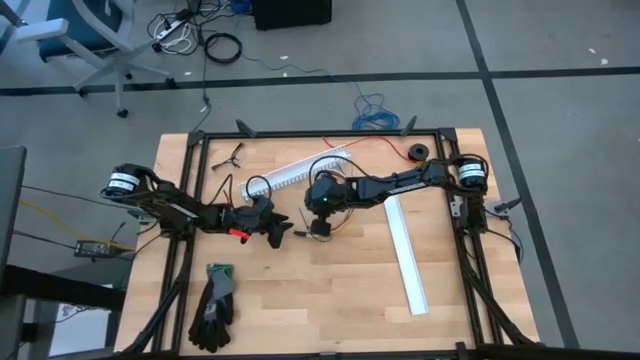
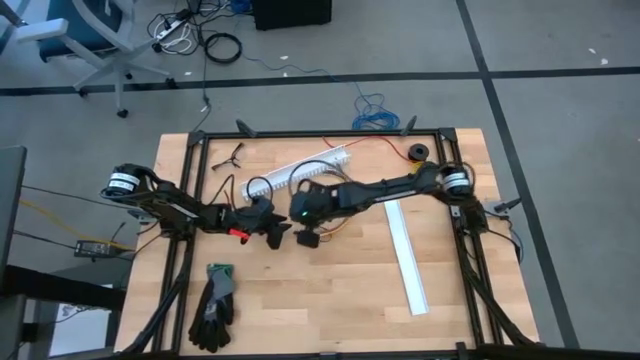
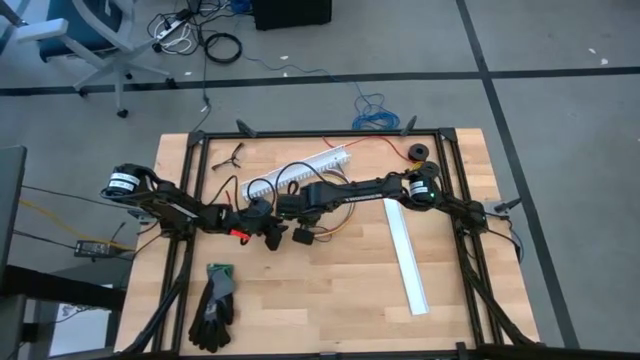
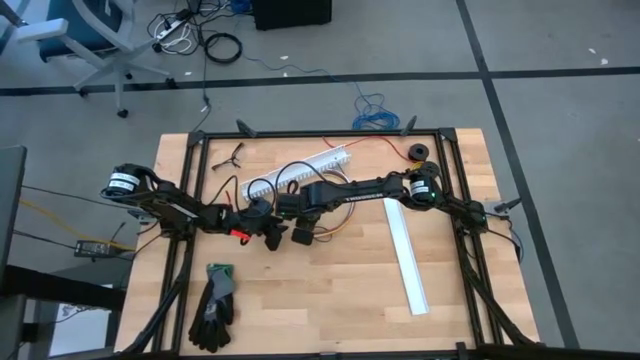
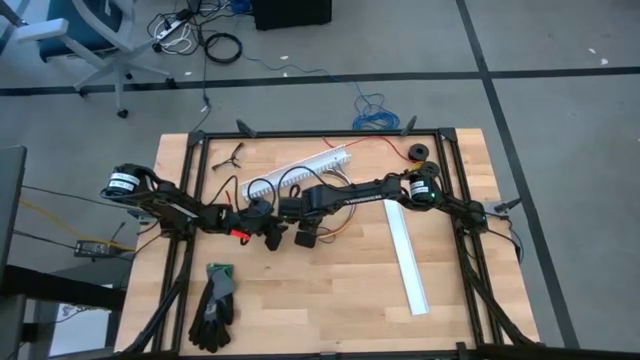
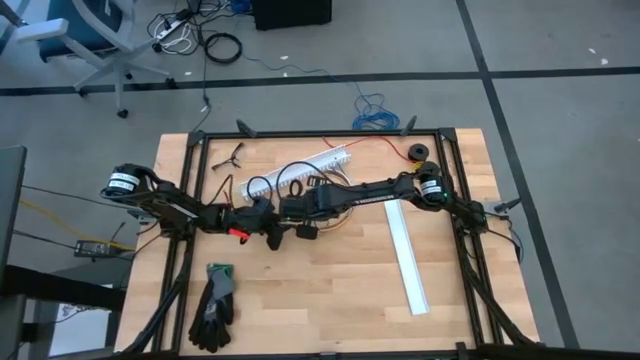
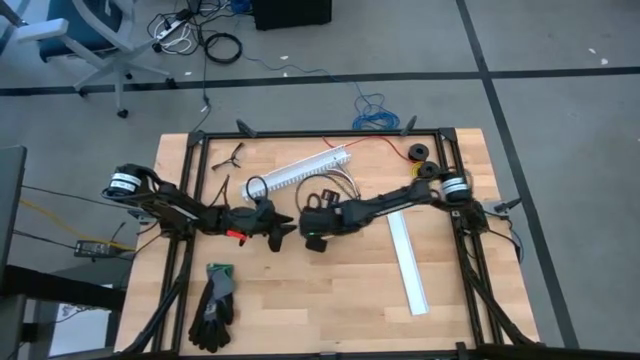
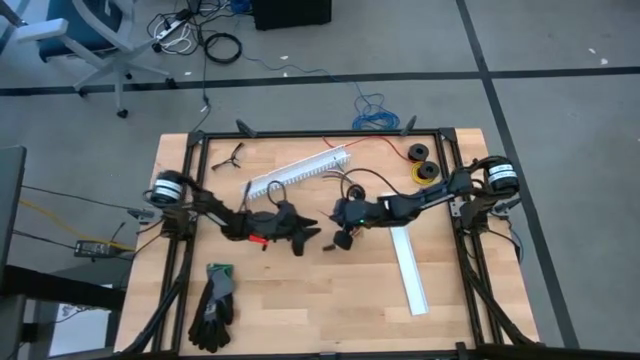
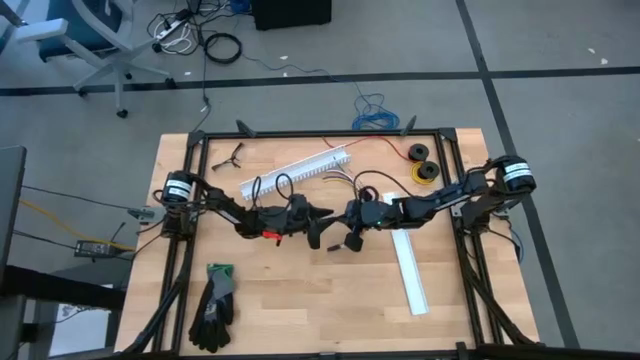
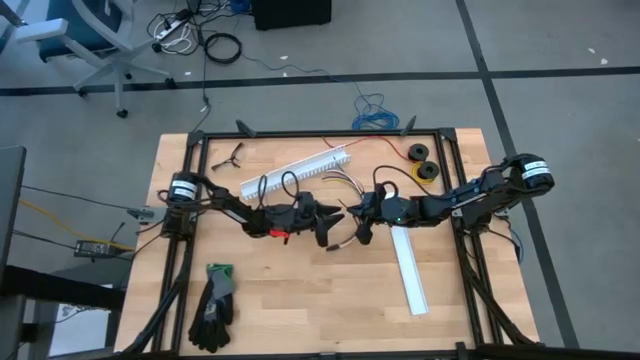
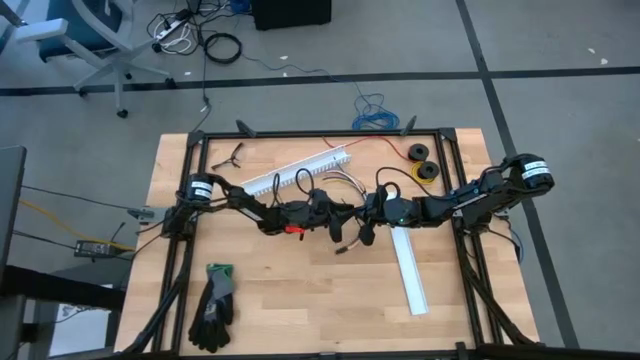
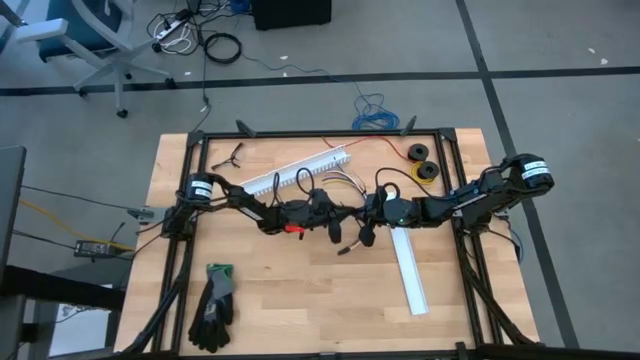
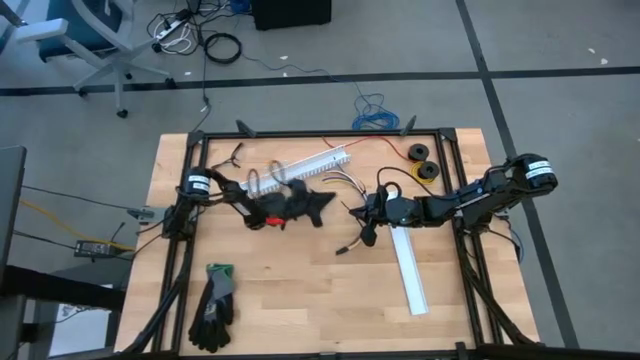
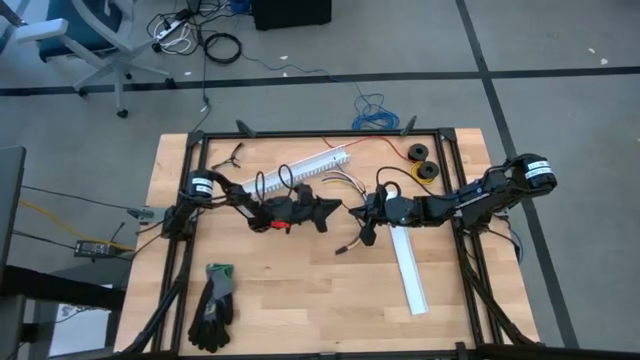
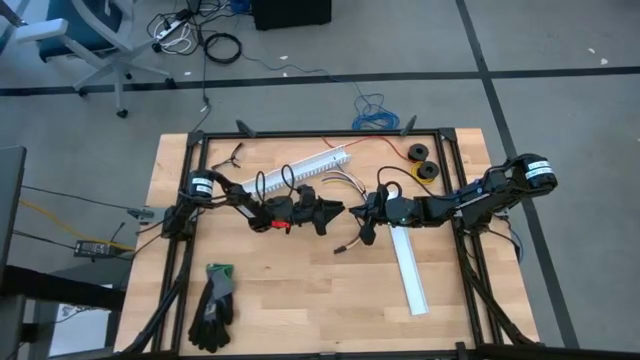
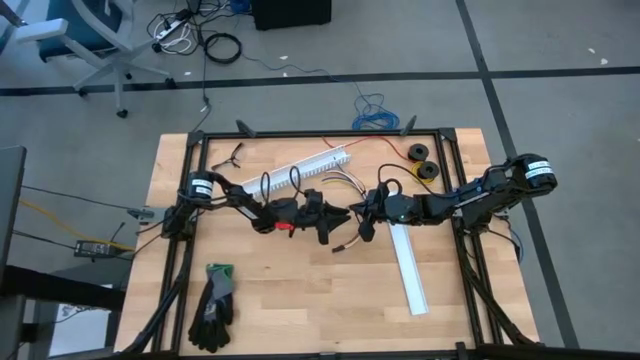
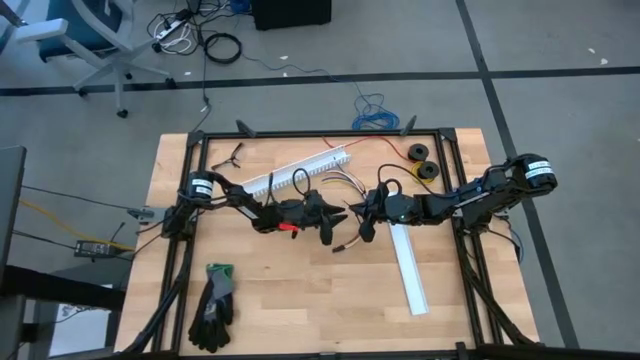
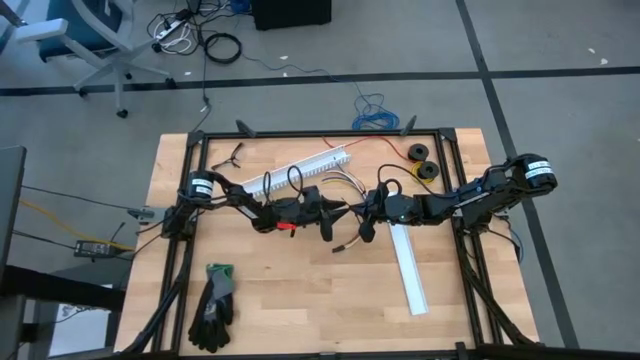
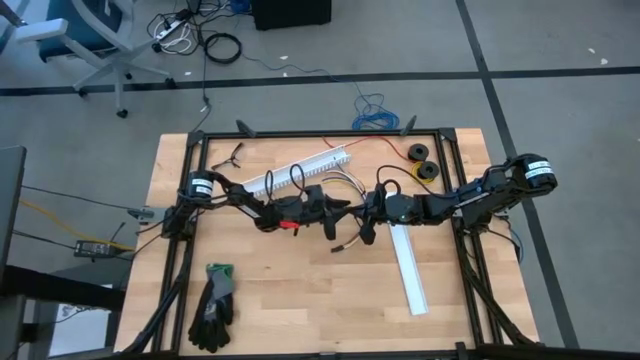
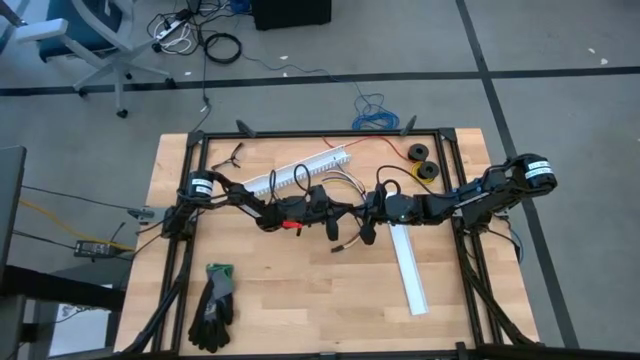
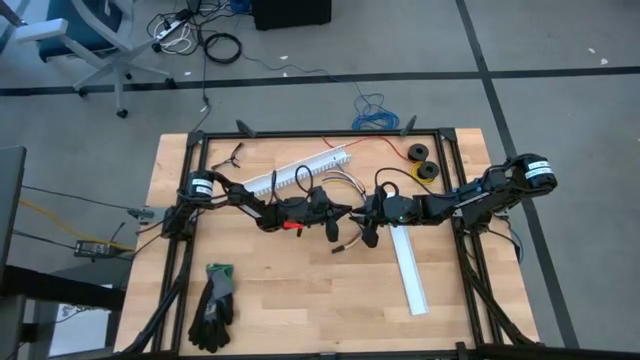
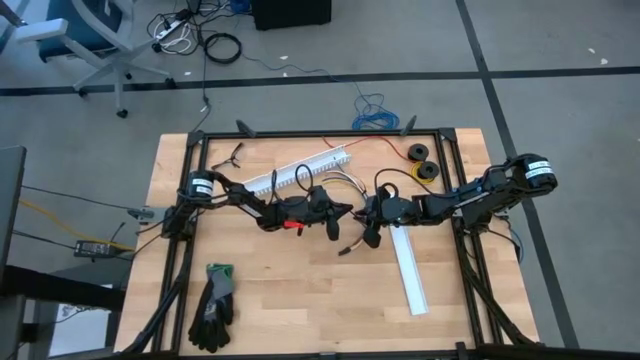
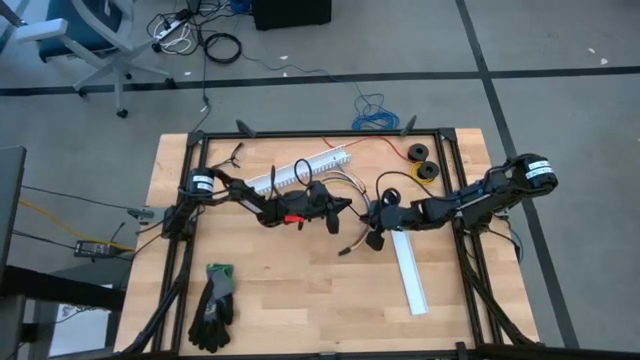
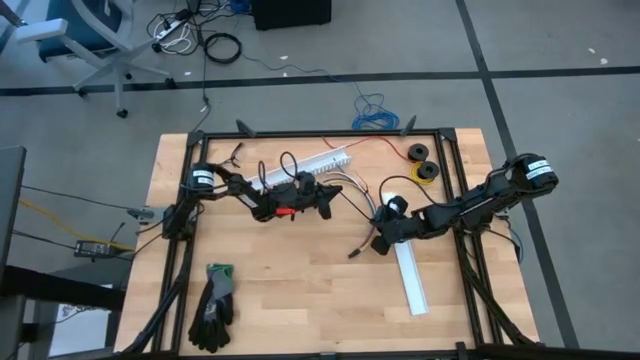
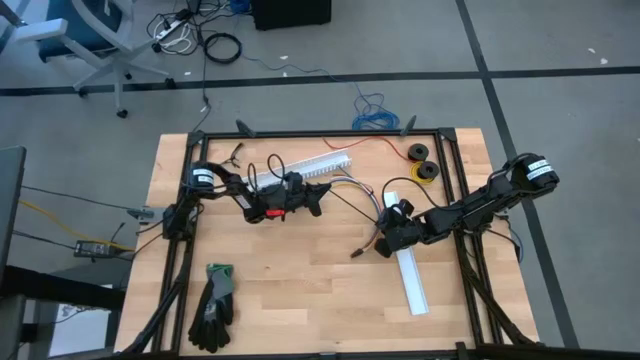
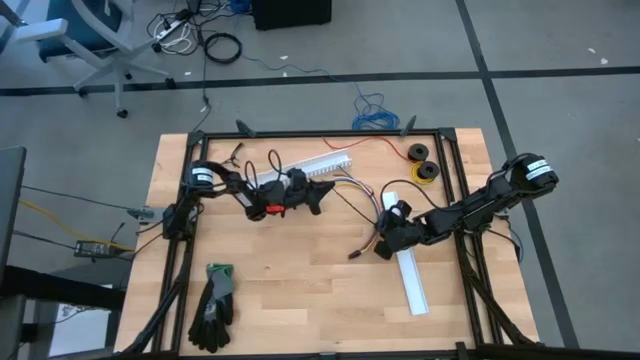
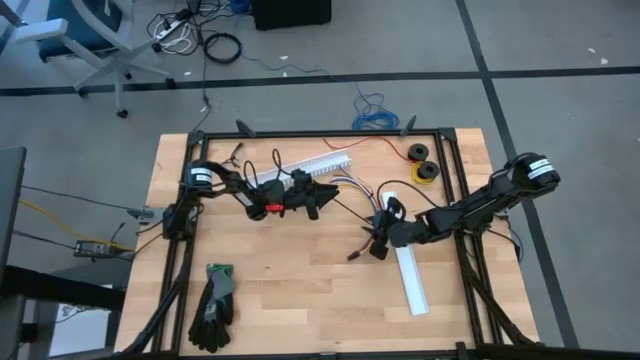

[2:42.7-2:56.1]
Task: Ziptie cables
Wrap the cable wires with black zip tie

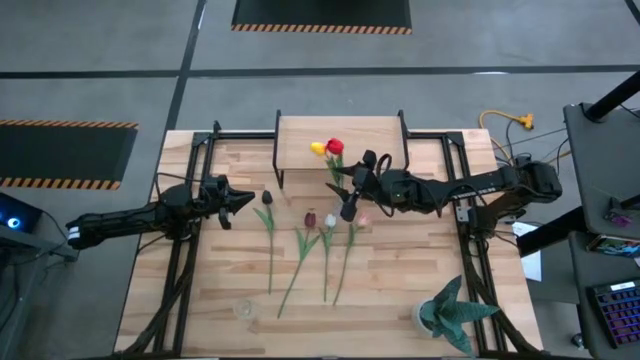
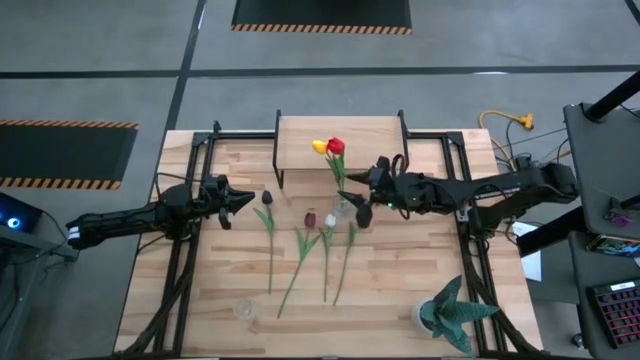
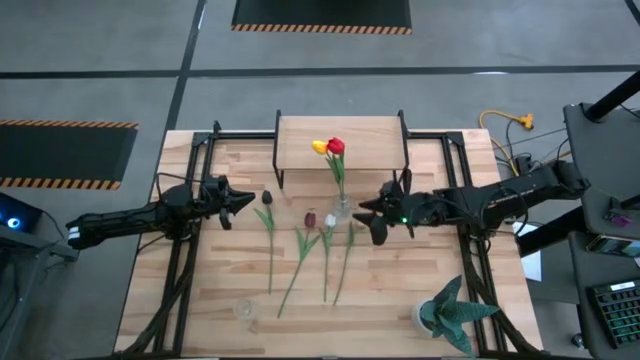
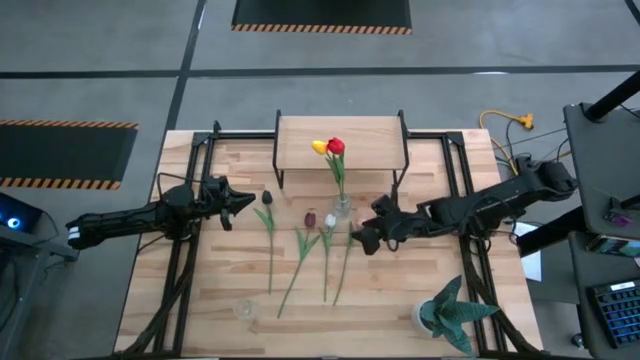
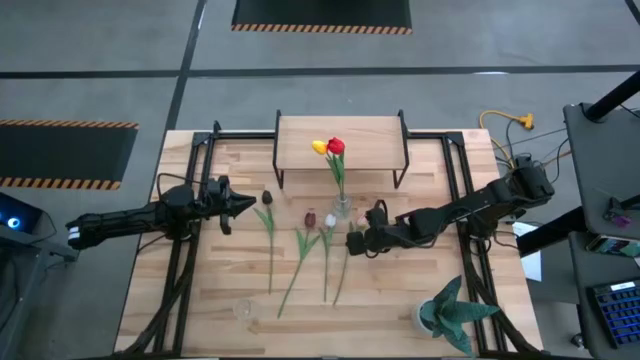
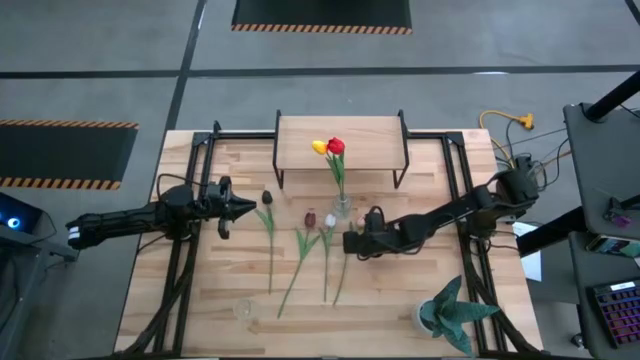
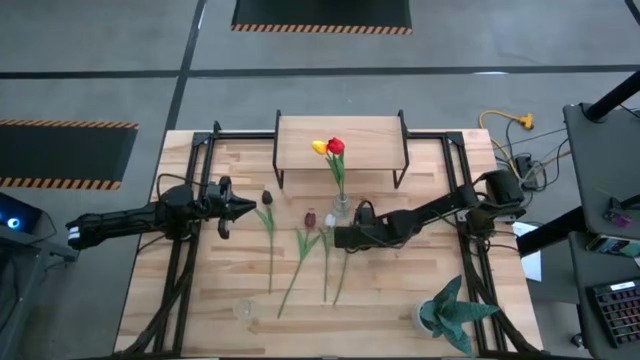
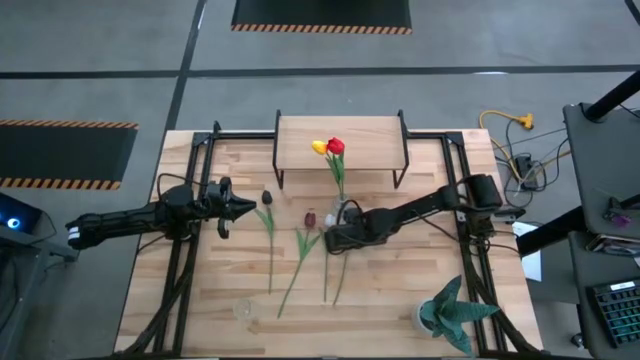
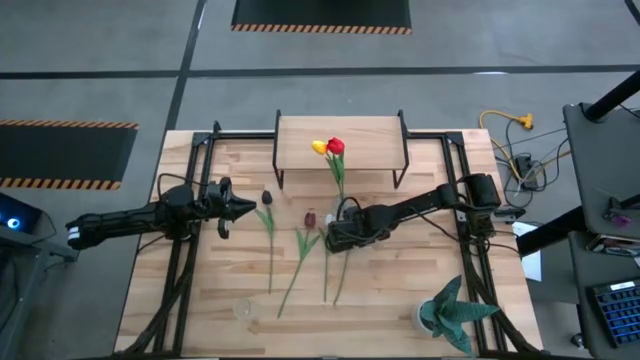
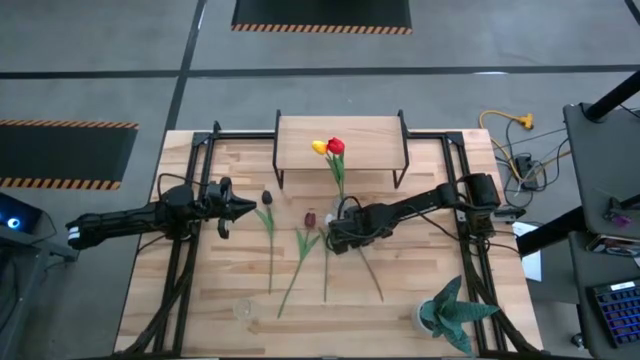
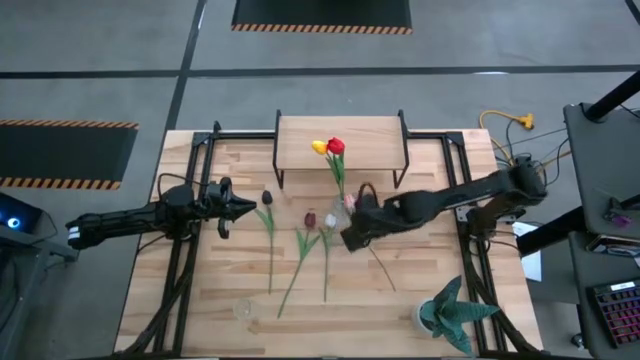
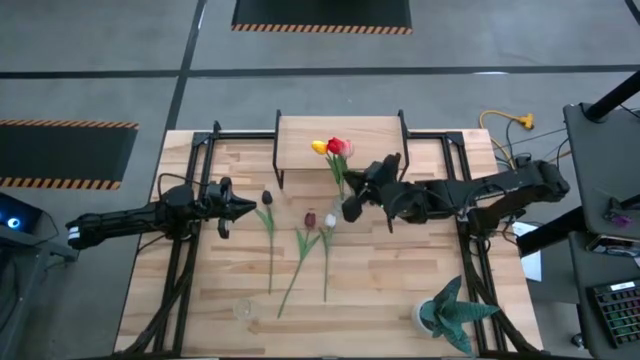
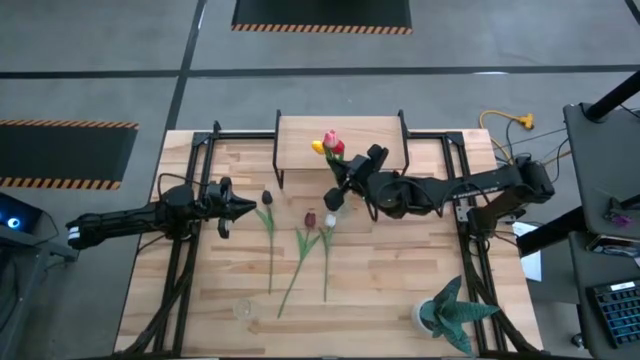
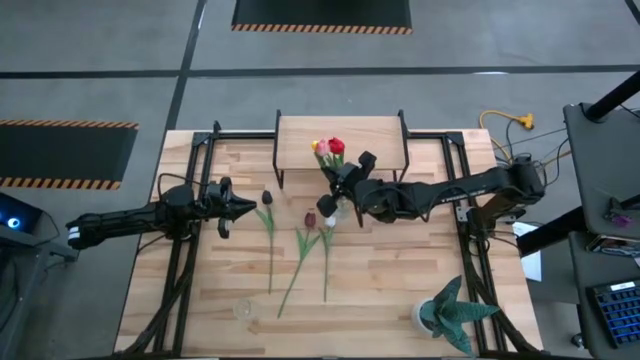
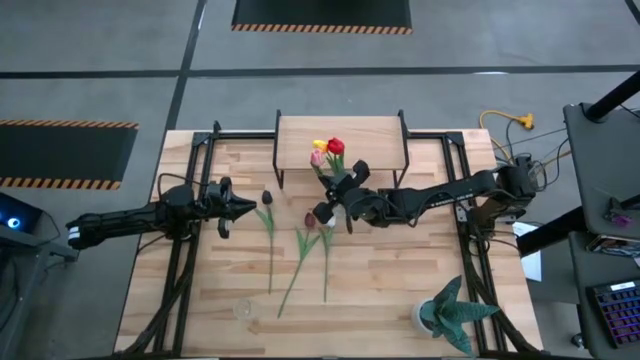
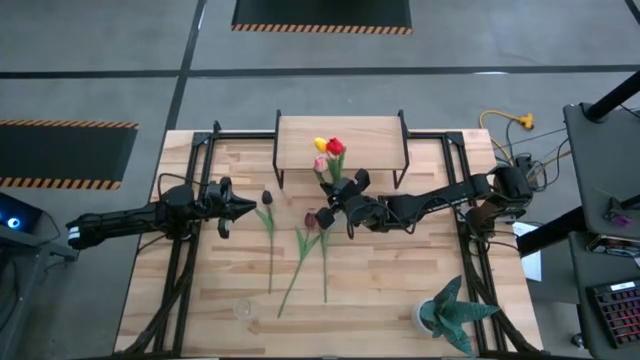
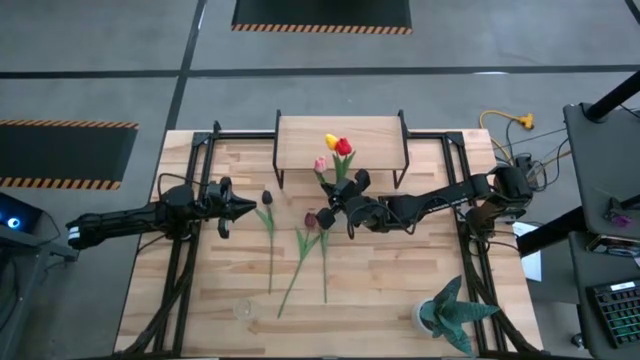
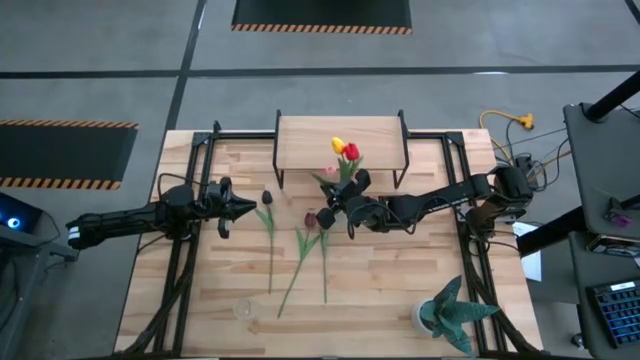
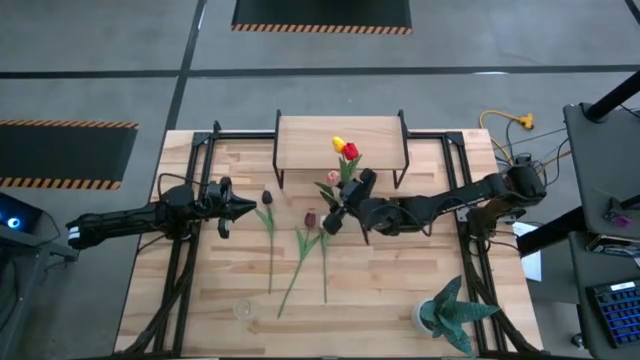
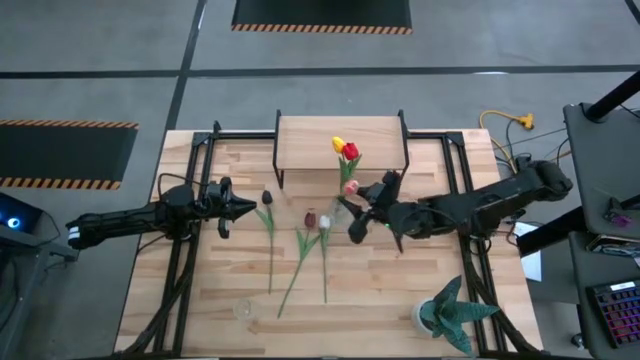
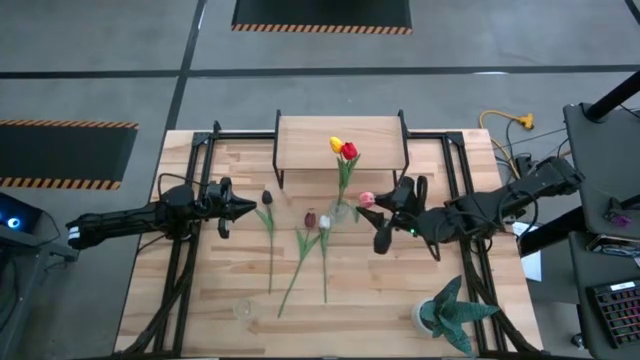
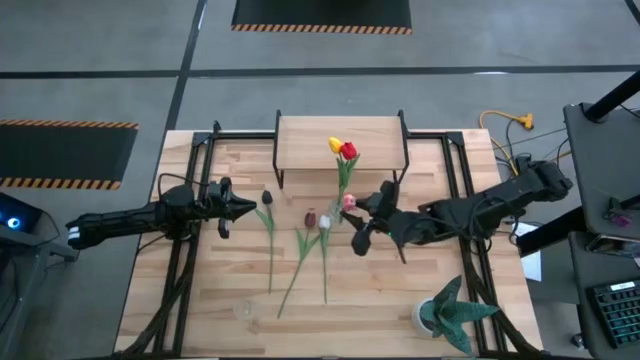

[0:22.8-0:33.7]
Task: Pick and place flowers into a vace then onto a shelf
Put the pink tulip into the top transparent vase
